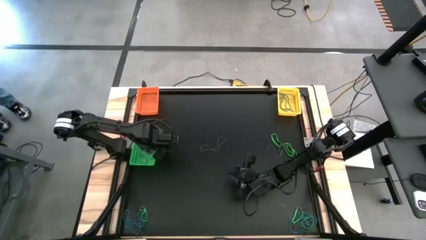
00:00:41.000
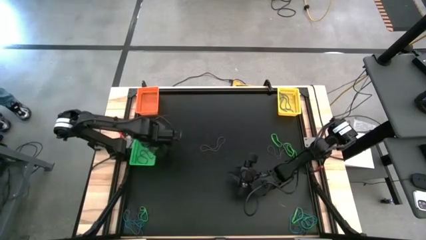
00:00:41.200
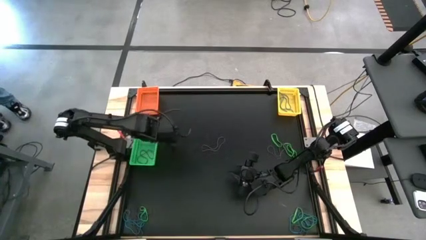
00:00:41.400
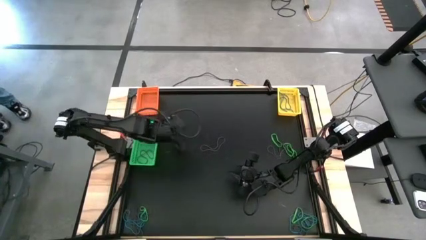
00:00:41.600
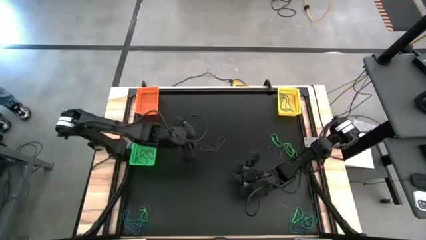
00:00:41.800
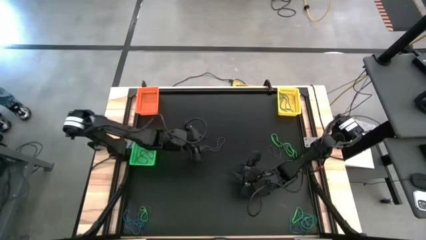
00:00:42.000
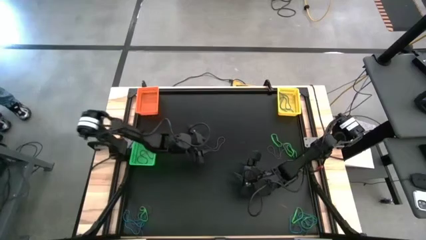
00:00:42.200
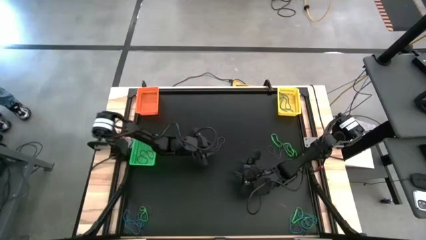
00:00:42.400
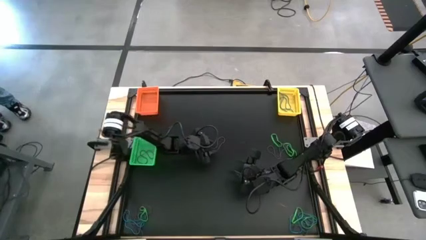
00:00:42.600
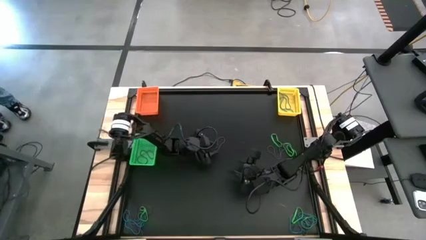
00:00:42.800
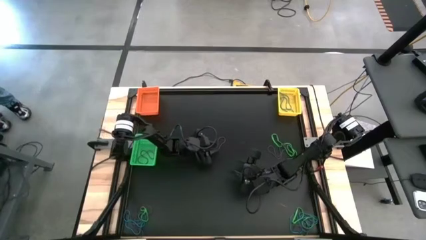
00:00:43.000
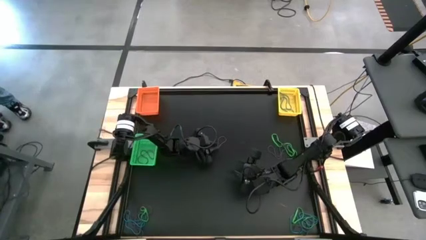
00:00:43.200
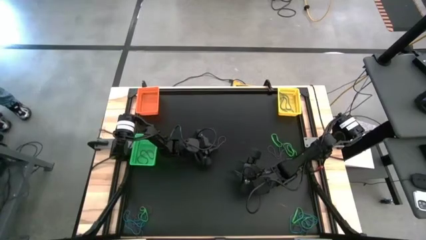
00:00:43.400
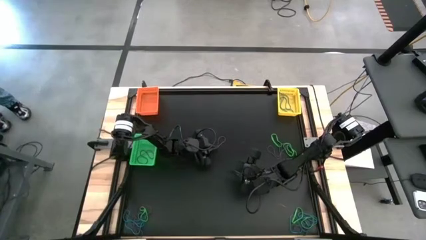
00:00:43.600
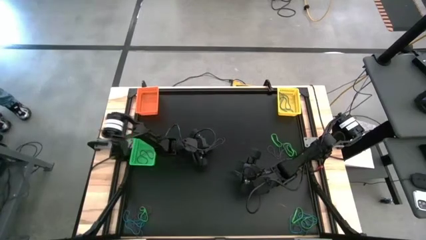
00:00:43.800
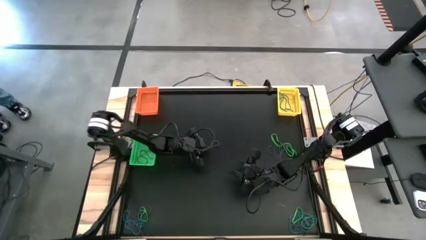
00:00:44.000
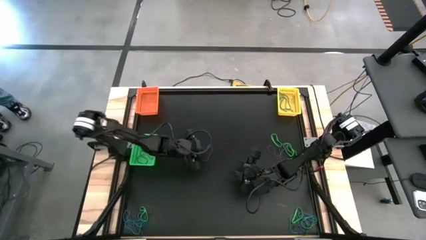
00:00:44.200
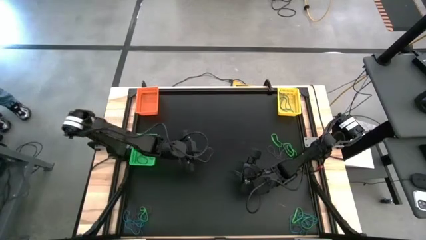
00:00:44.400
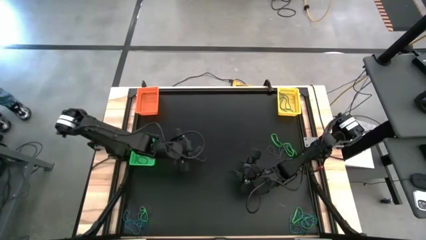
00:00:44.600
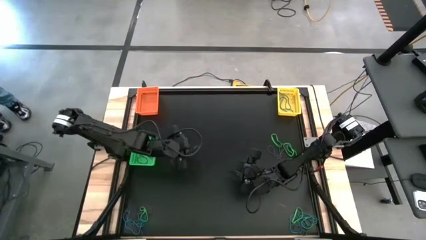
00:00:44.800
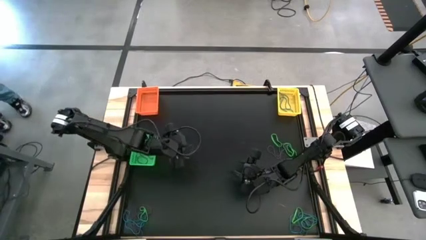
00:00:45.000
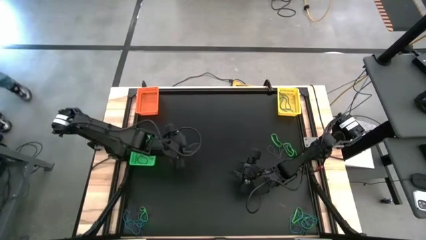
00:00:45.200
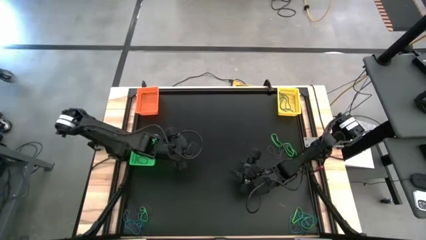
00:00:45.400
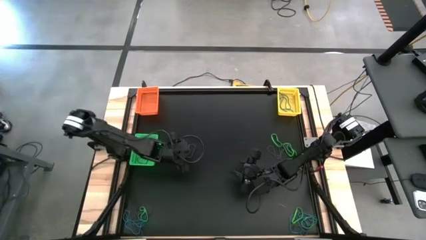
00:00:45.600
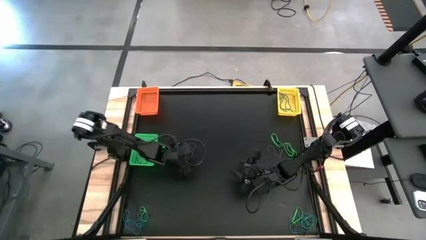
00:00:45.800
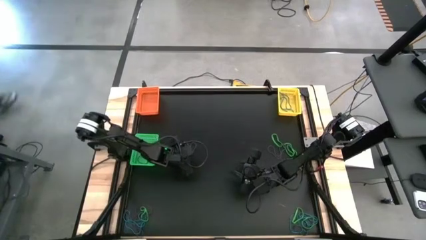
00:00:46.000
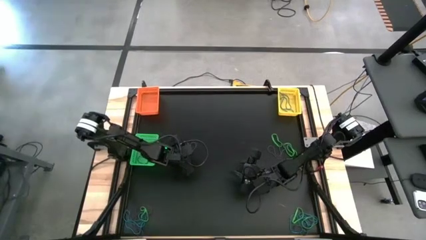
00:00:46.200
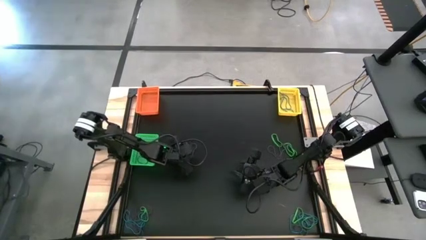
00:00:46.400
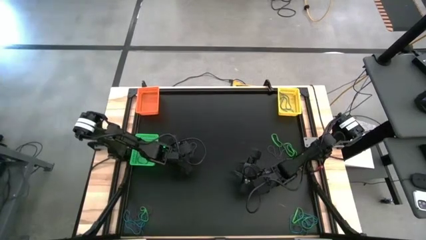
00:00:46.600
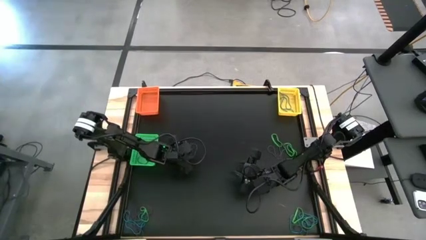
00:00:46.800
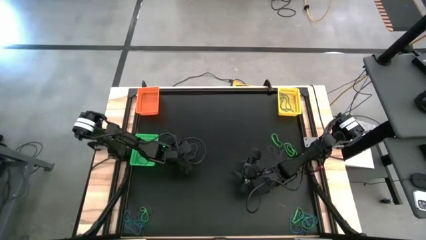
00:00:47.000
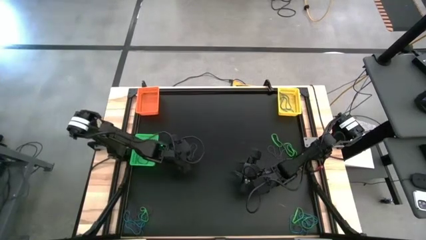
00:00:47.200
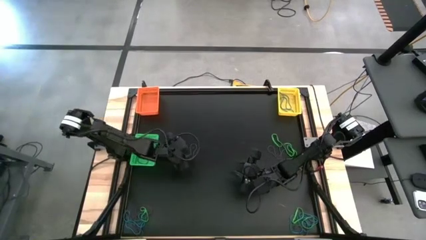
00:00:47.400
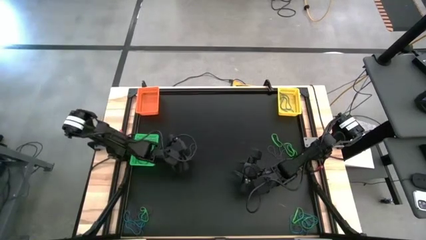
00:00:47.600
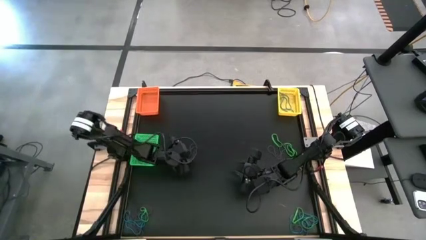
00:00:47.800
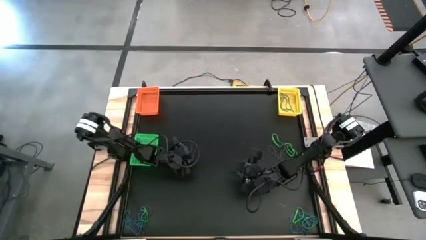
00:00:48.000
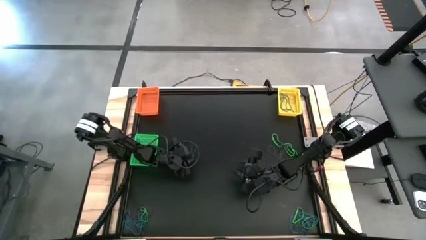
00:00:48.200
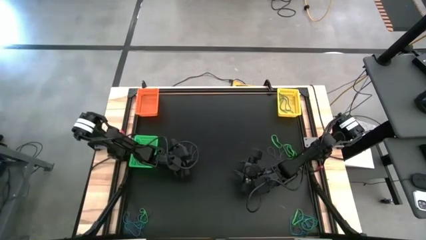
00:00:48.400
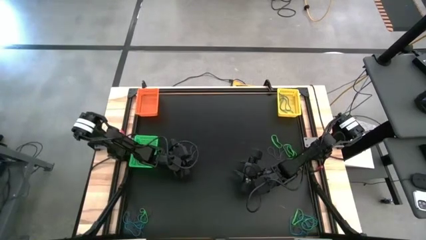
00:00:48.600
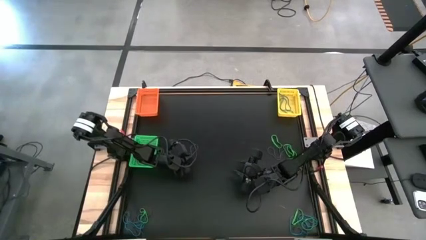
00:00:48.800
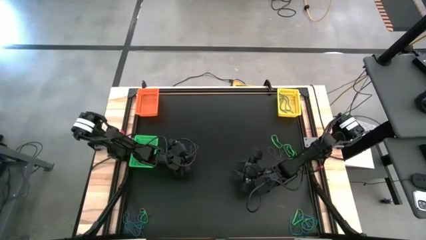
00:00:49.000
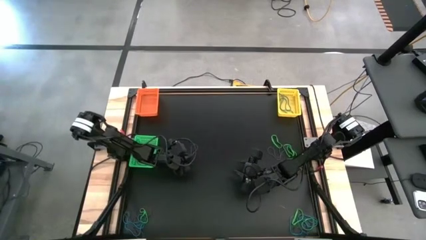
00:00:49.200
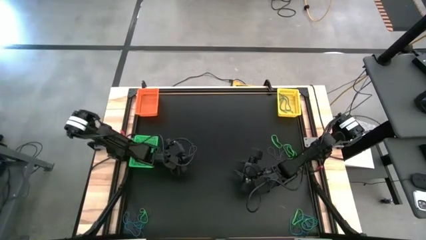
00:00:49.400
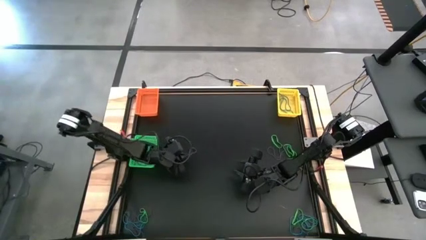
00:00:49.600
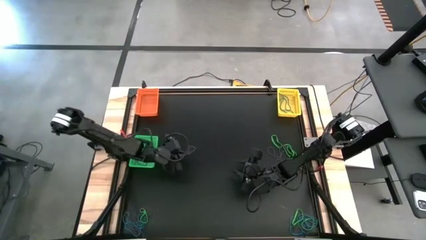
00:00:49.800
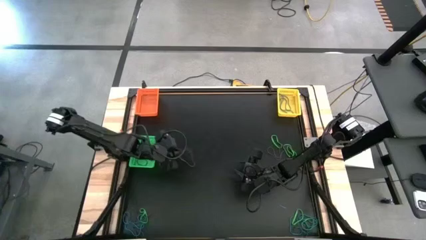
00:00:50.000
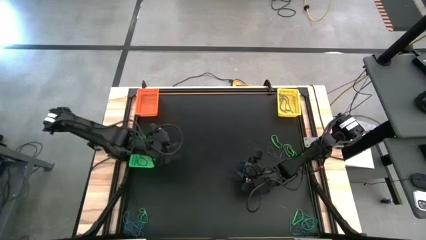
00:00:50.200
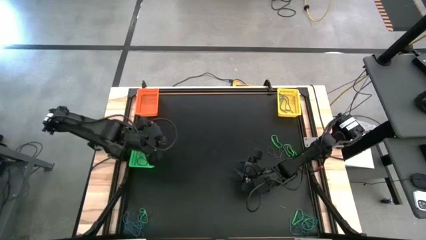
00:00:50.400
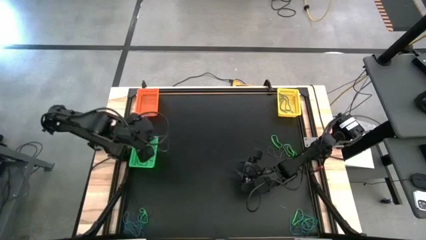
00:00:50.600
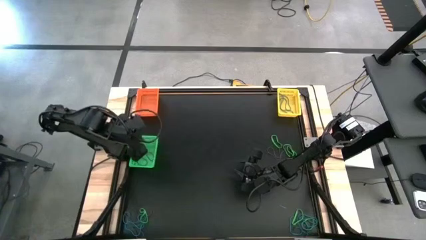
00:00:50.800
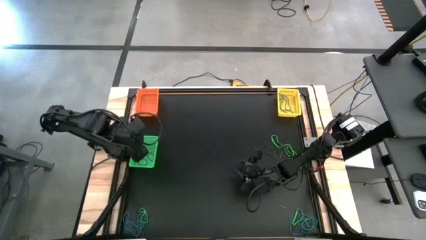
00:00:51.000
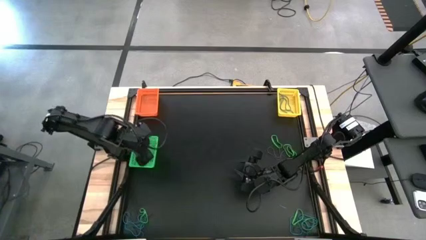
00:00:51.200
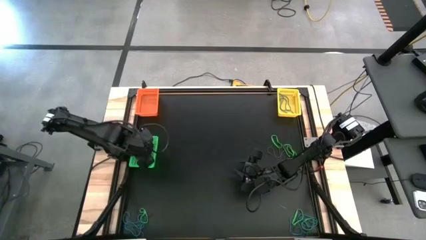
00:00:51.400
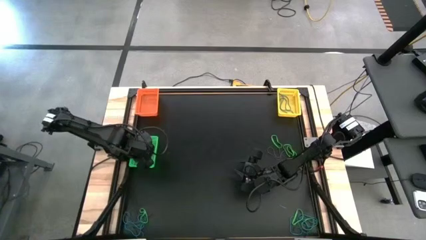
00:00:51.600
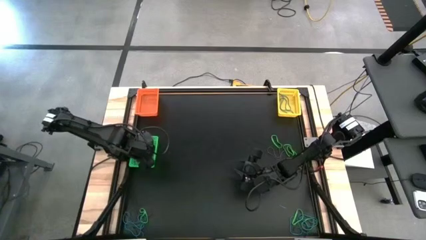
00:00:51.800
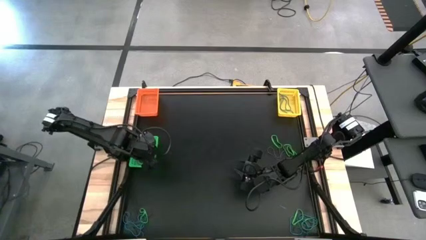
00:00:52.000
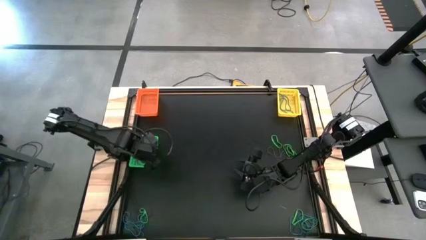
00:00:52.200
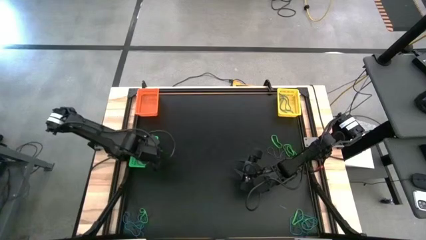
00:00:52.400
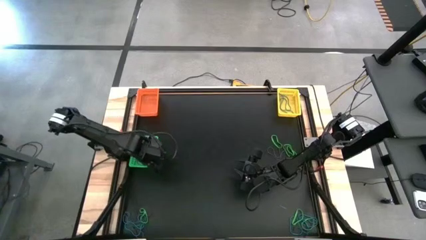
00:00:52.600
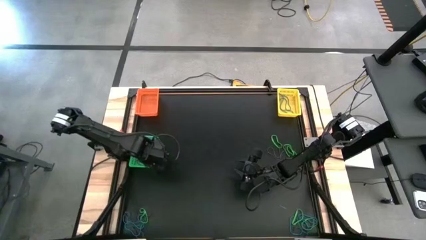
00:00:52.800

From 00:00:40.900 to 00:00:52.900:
Task: Sort rubber bands into baskets
Put the center violet rubber band into the green bin

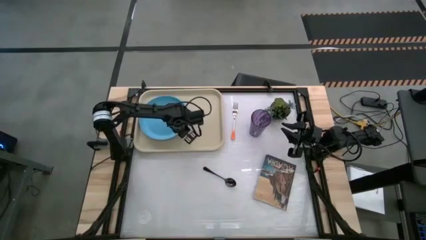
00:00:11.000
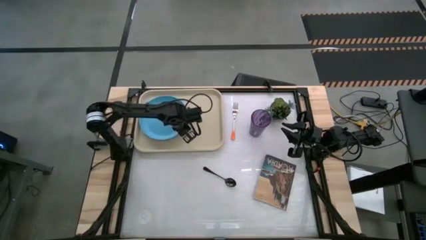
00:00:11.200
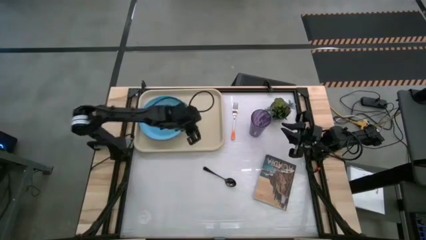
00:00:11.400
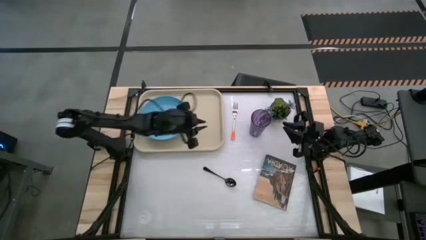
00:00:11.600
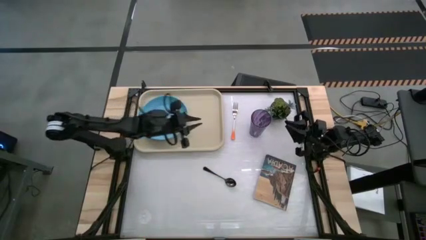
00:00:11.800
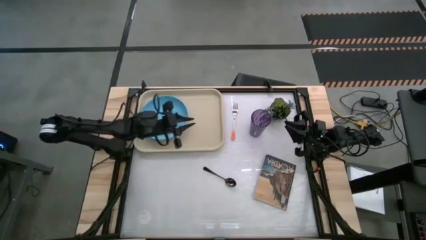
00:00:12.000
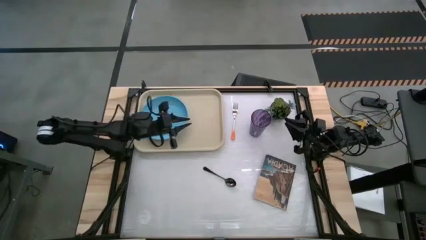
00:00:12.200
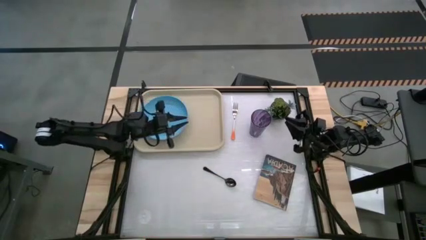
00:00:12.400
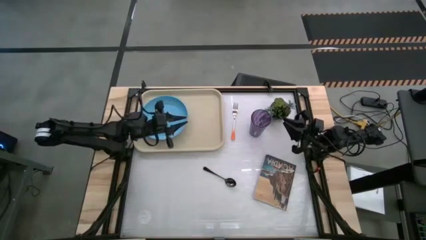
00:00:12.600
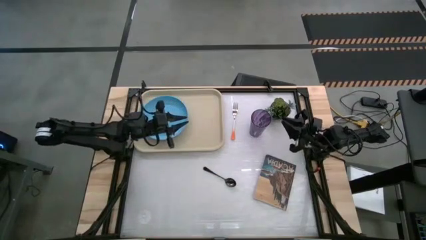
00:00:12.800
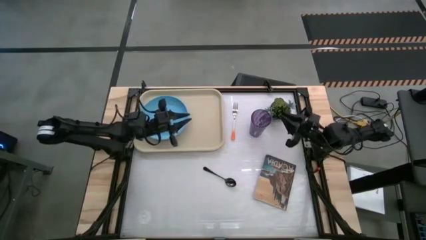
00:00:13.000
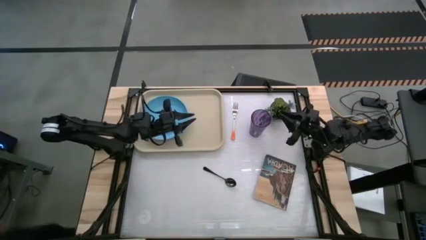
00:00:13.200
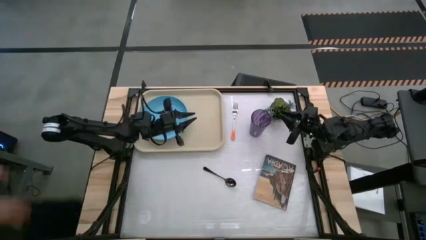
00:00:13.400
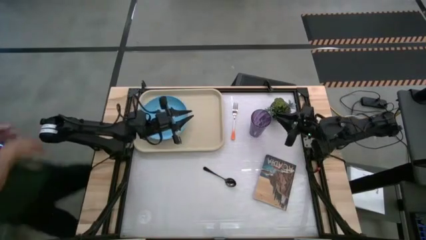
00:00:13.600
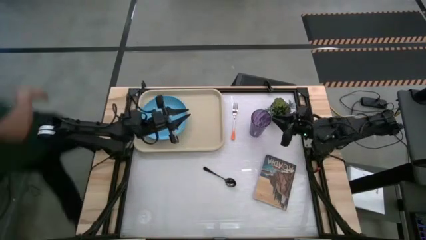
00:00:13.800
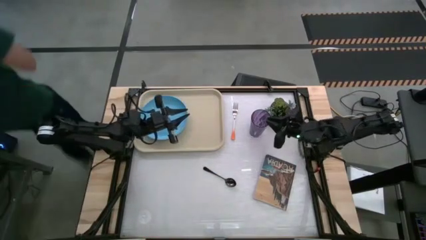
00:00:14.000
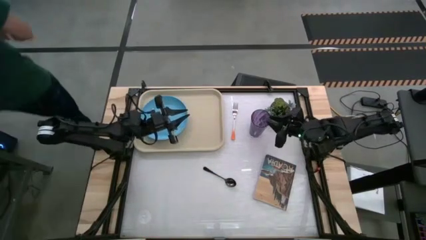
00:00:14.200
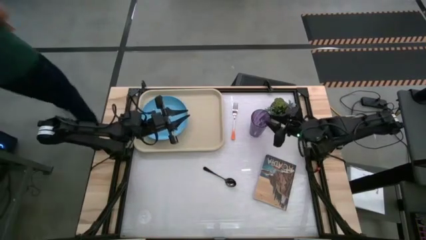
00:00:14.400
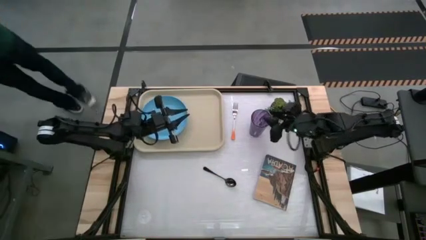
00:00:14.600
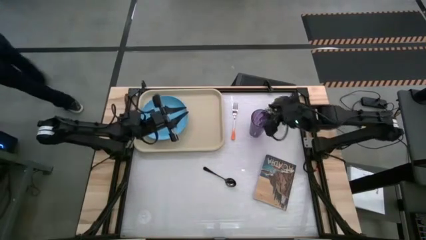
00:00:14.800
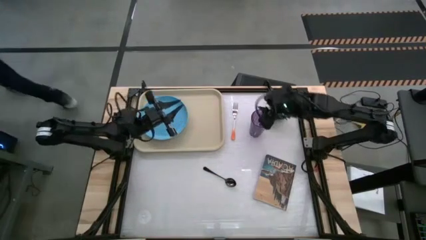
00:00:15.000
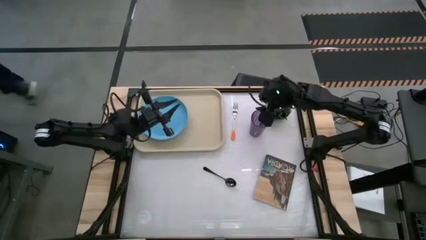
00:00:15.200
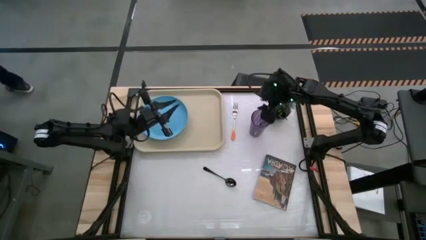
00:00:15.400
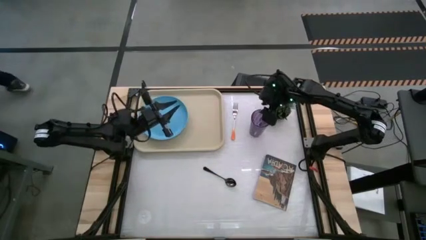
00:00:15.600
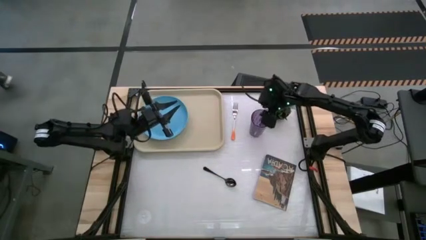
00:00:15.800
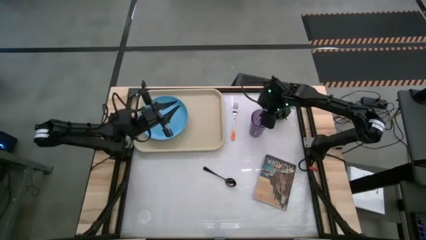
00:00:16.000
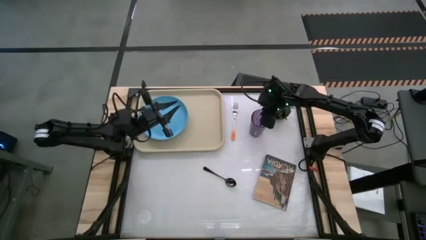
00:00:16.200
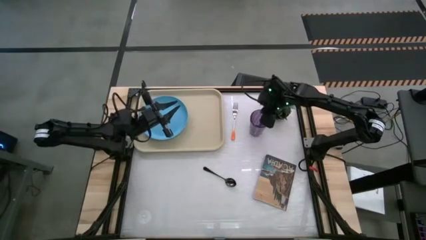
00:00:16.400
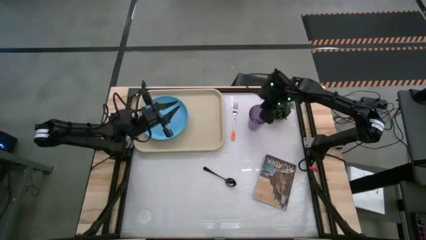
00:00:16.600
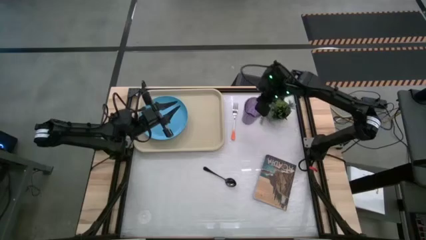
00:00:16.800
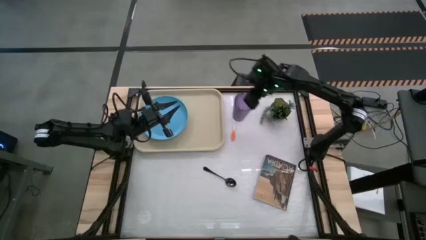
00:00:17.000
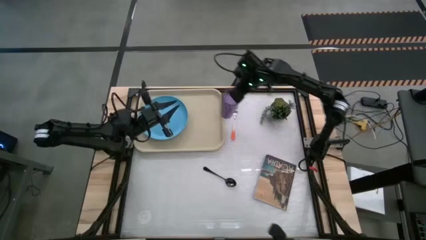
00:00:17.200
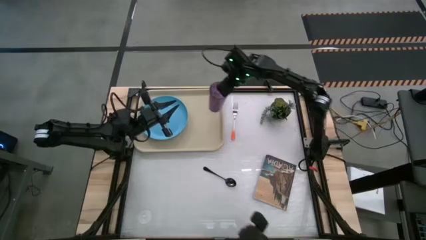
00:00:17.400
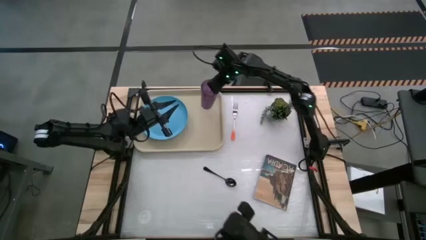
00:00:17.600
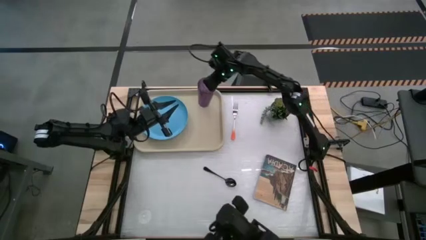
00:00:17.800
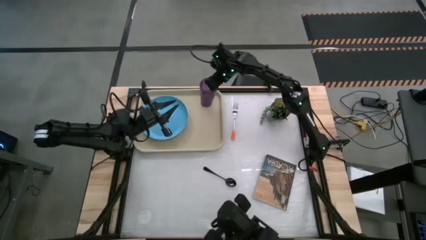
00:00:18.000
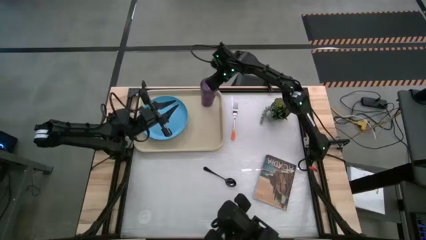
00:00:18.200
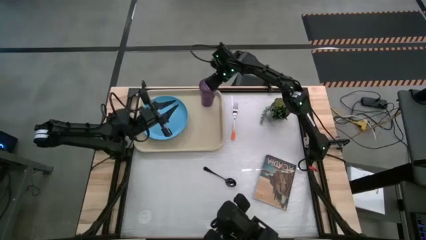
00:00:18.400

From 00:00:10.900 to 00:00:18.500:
Task: Pick and place plate/cup/fork/spoon on tray
Put the purple cup on the brown tray
